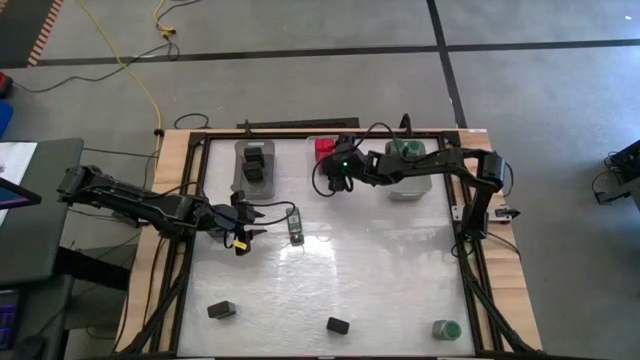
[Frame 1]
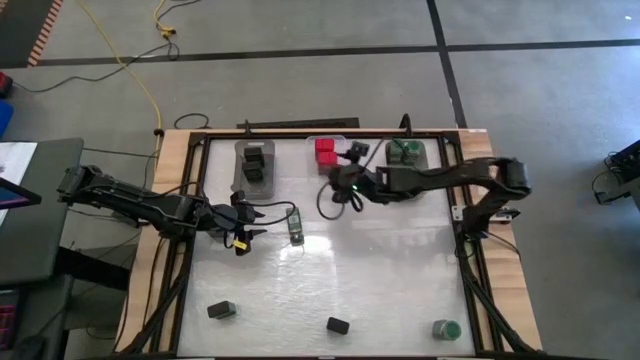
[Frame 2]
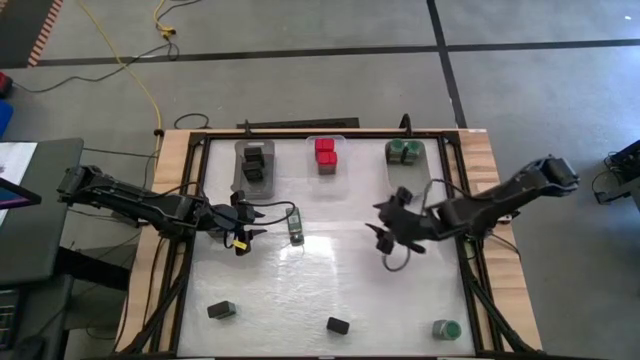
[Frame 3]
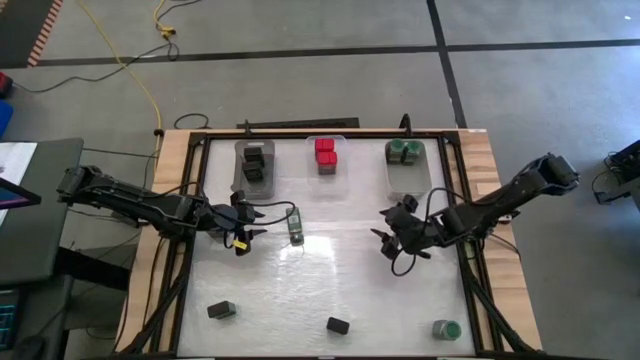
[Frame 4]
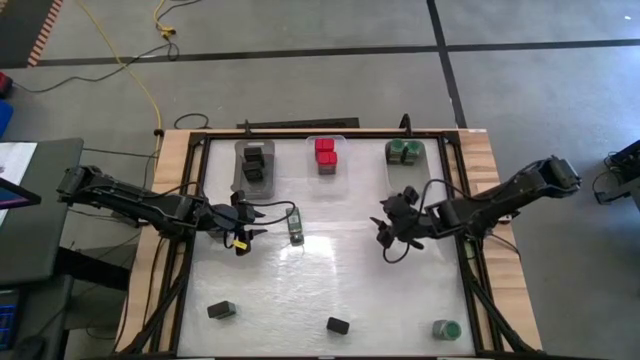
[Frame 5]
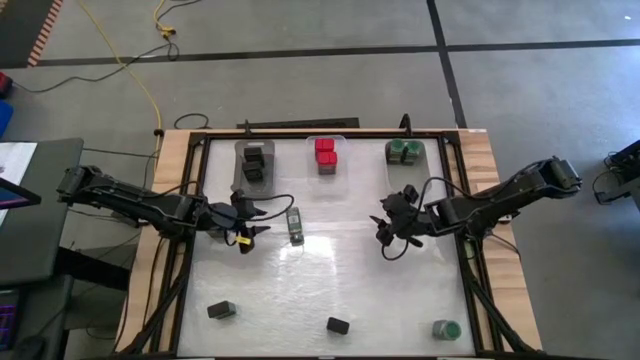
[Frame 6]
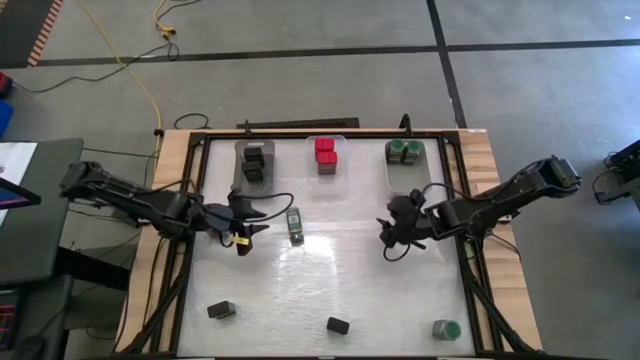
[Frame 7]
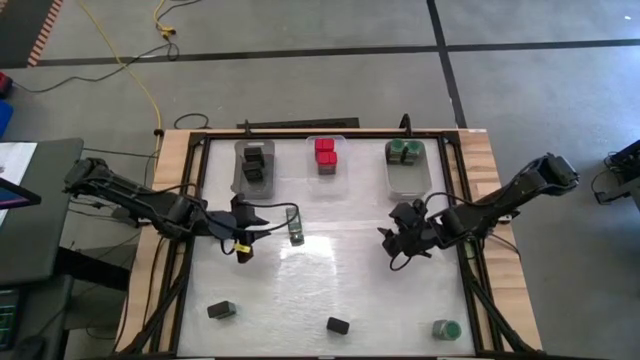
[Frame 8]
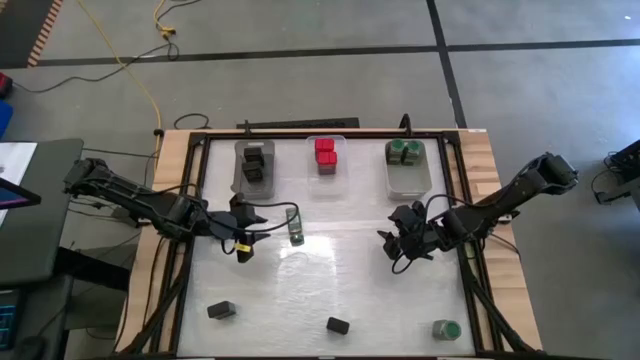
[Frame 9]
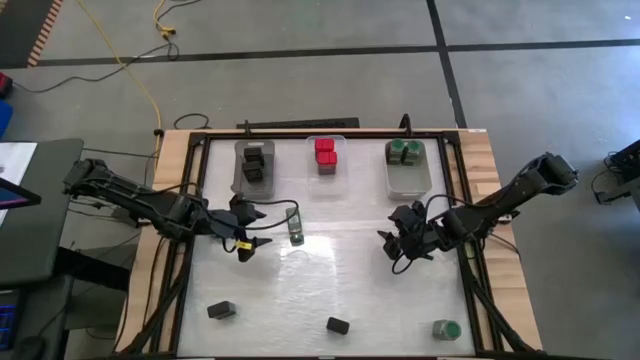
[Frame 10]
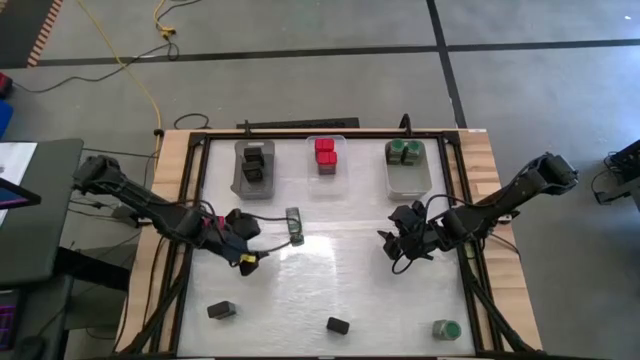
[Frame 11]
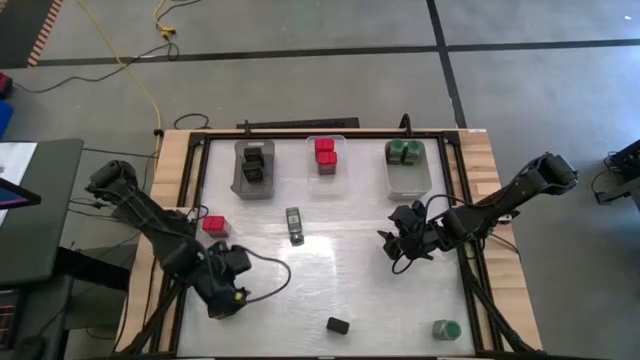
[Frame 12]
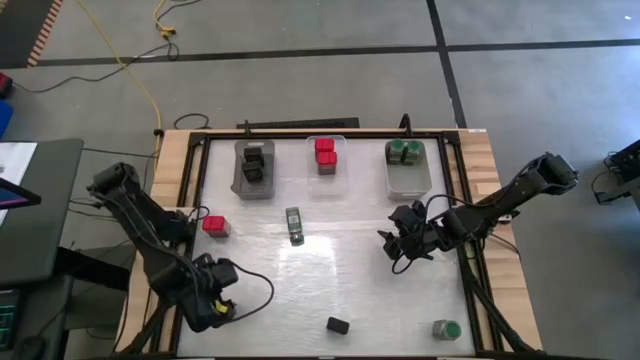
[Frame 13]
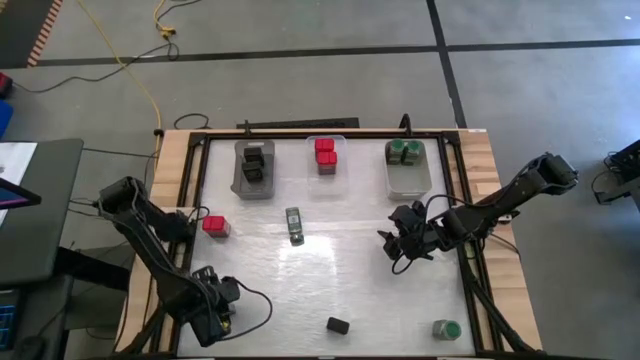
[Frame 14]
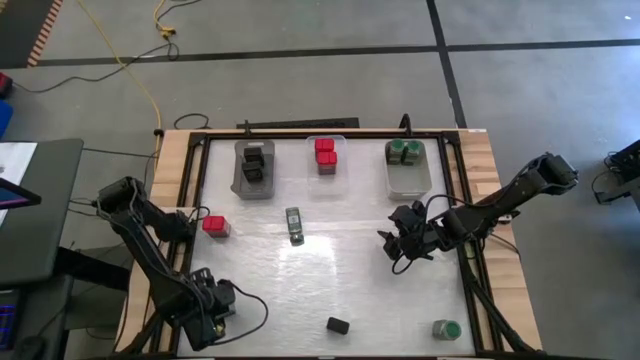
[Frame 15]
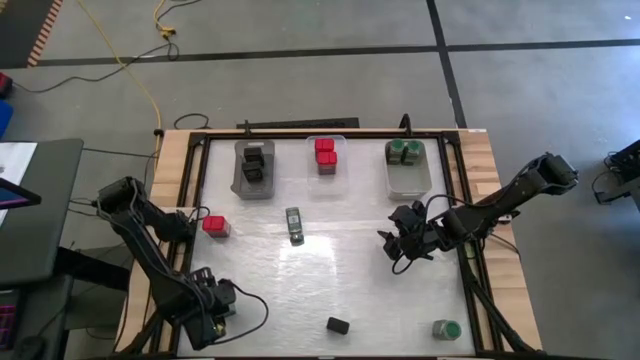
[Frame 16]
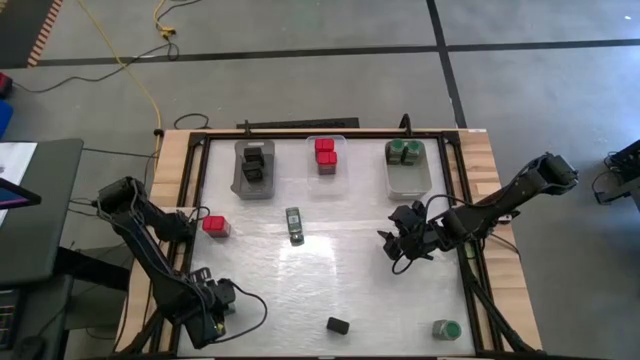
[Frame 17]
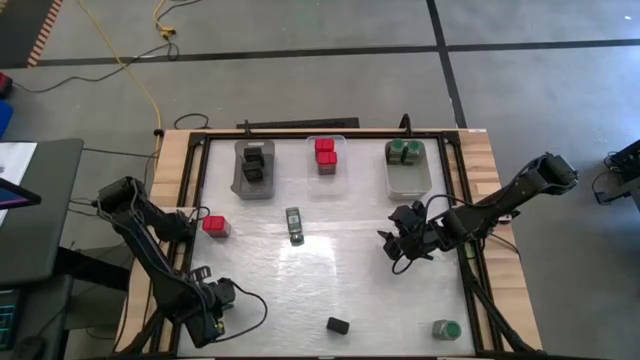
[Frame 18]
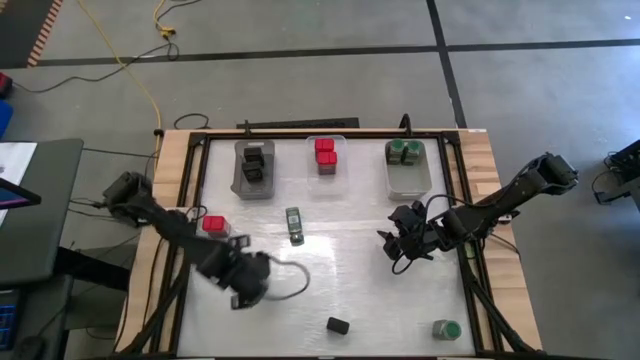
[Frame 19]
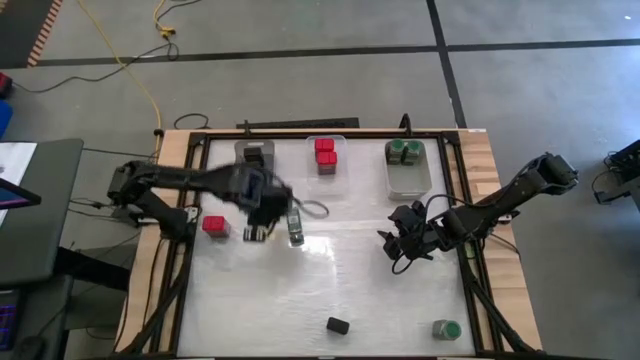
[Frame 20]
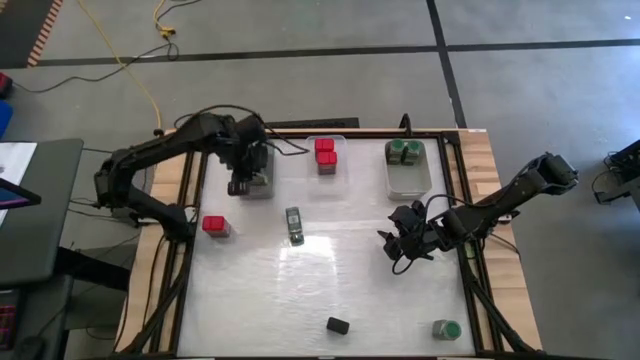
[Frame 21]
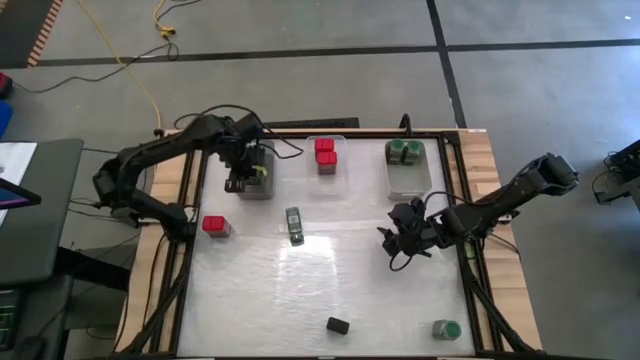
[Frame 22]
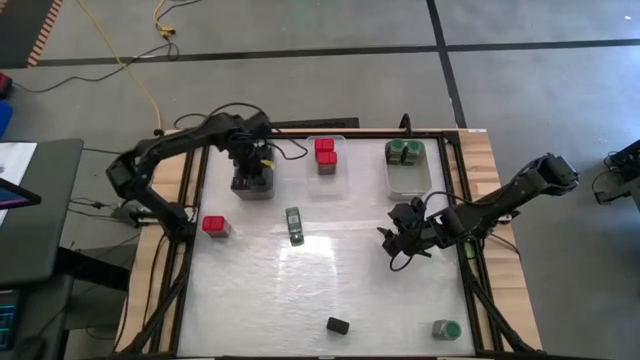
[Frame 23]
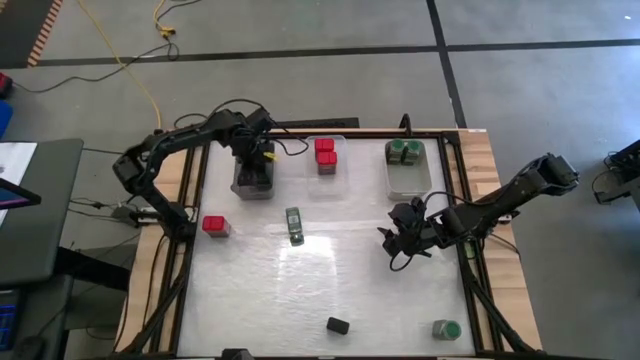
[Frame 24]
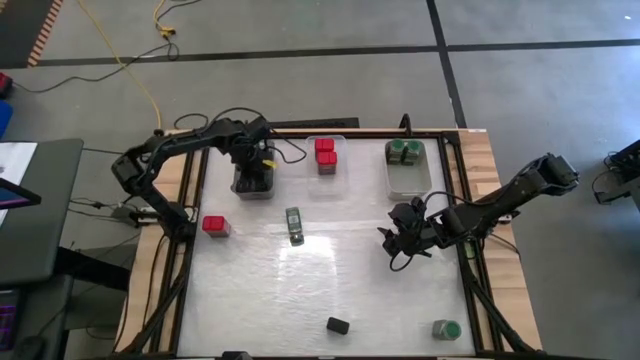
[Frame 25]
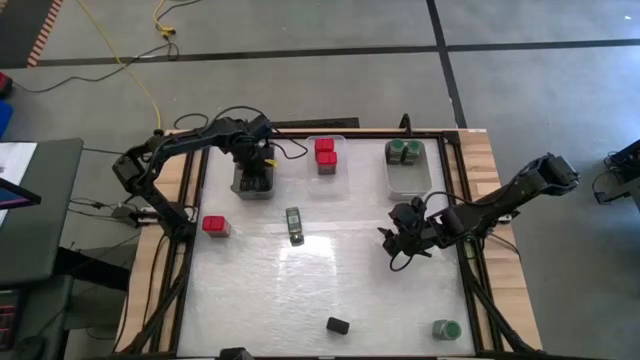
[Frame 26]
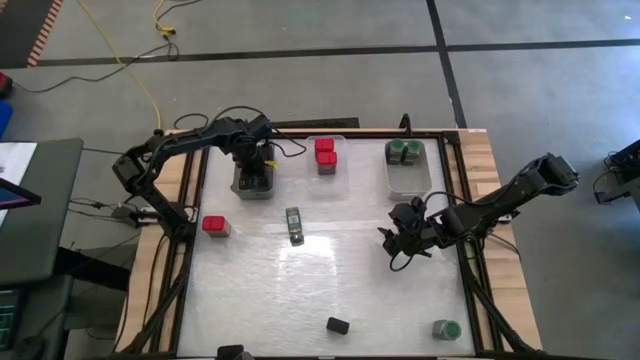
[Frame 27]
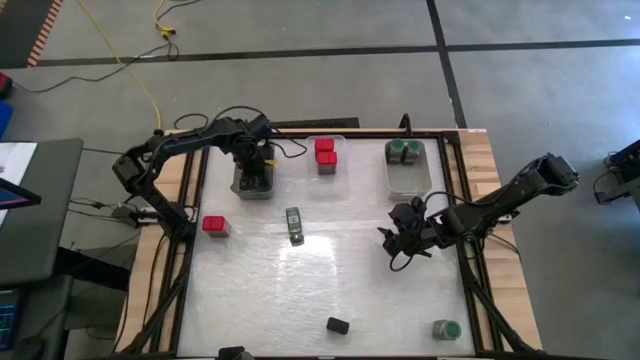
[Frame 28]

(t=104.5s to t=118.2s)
Task: Sort spices by type
Put the black seasoning can into the black bin
